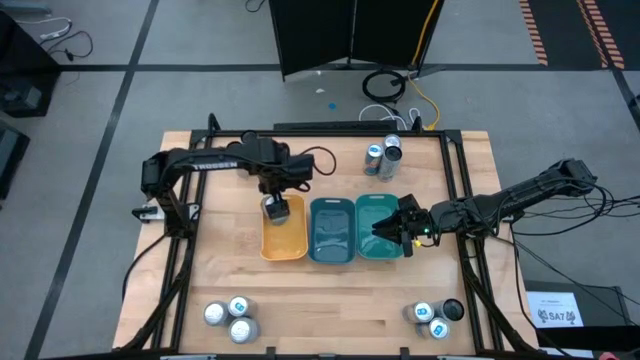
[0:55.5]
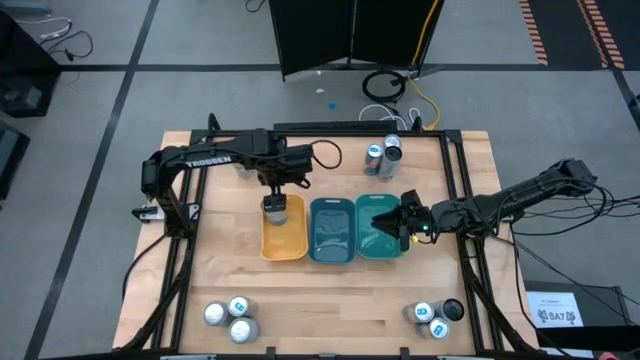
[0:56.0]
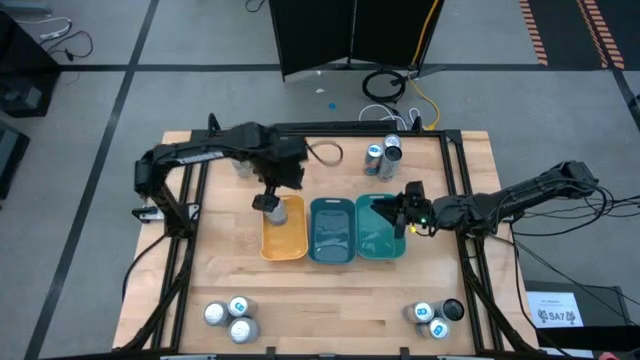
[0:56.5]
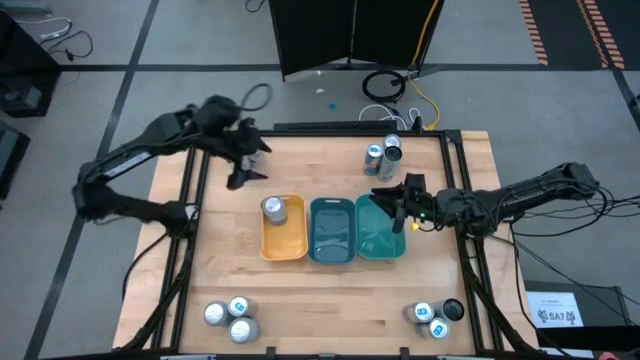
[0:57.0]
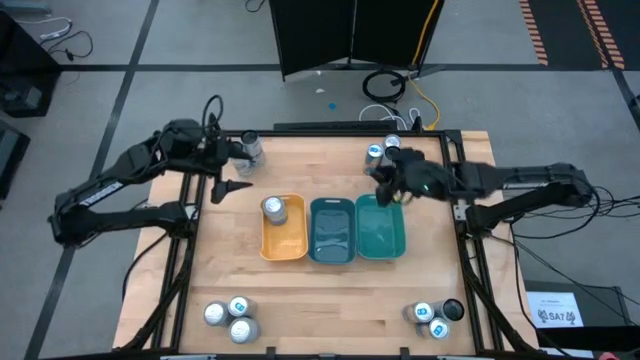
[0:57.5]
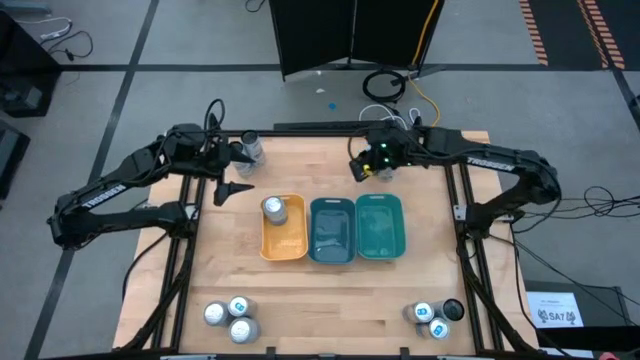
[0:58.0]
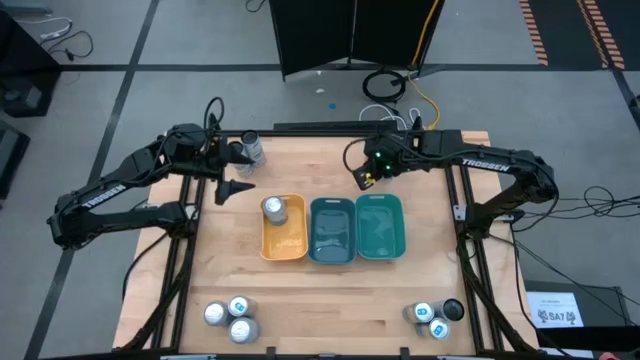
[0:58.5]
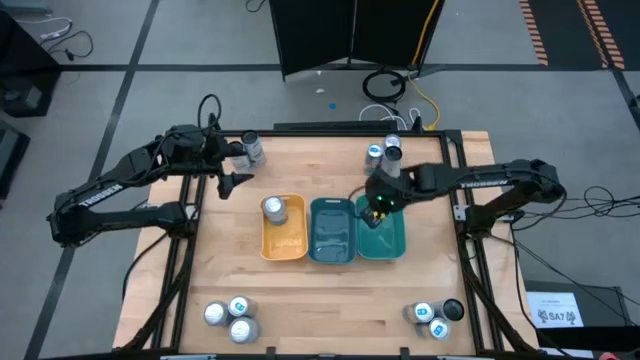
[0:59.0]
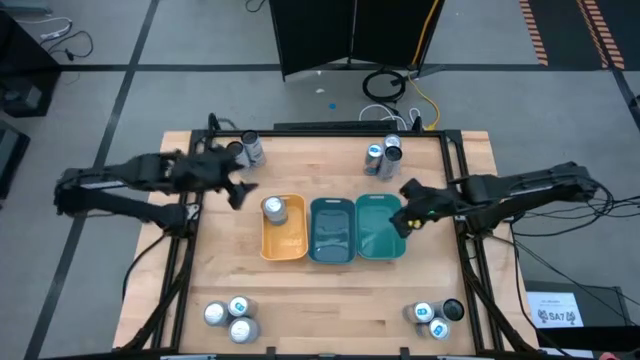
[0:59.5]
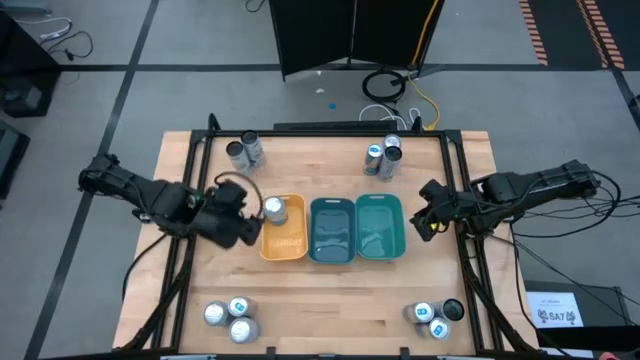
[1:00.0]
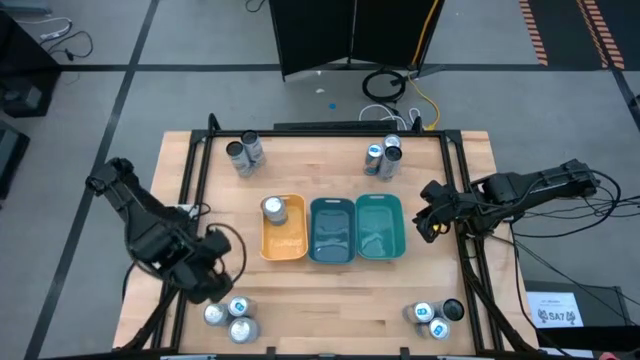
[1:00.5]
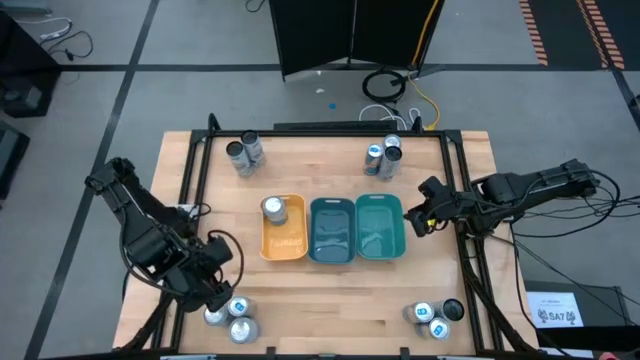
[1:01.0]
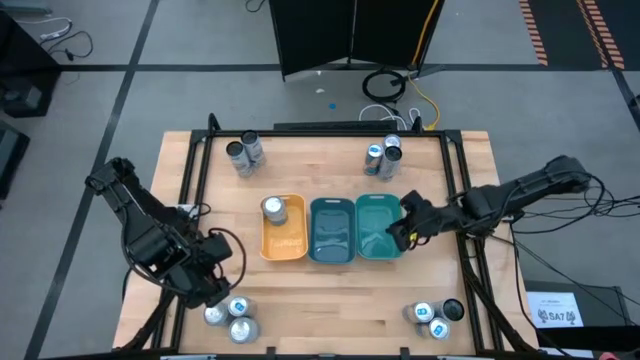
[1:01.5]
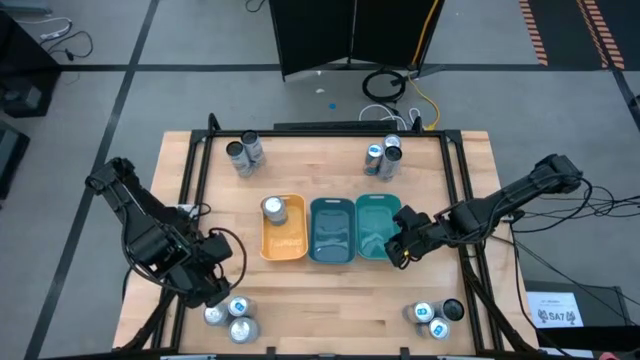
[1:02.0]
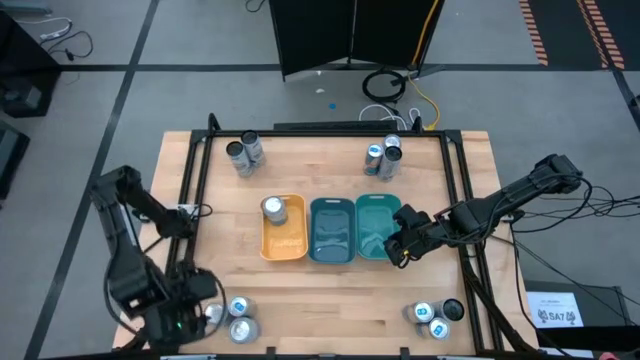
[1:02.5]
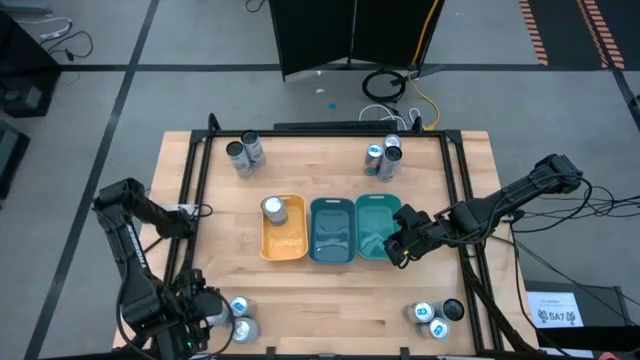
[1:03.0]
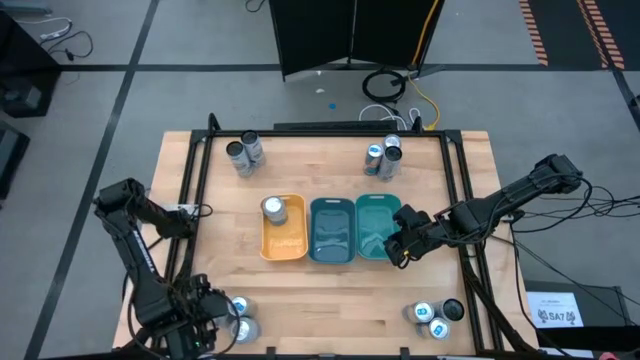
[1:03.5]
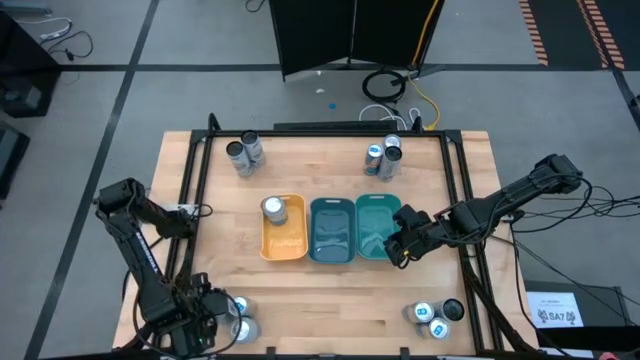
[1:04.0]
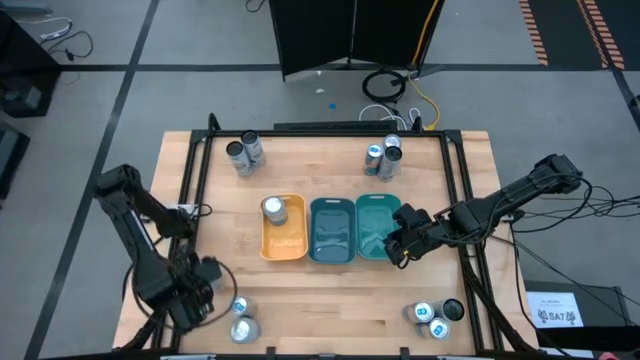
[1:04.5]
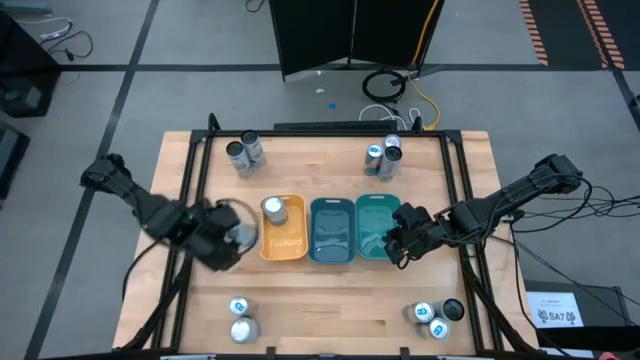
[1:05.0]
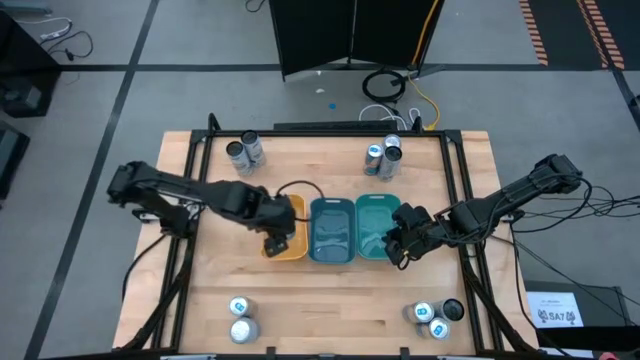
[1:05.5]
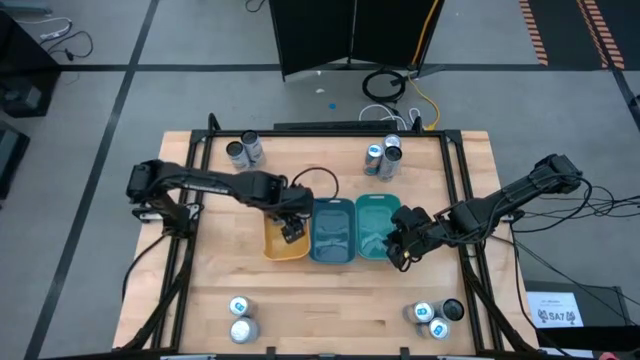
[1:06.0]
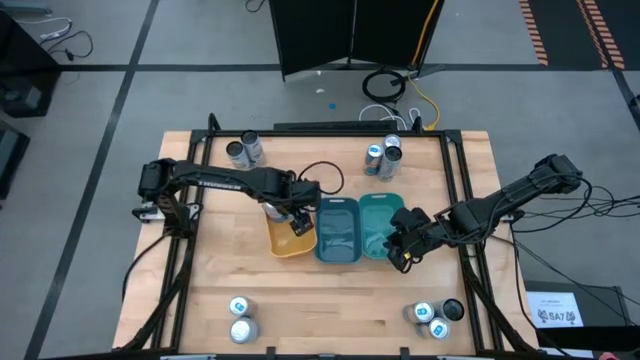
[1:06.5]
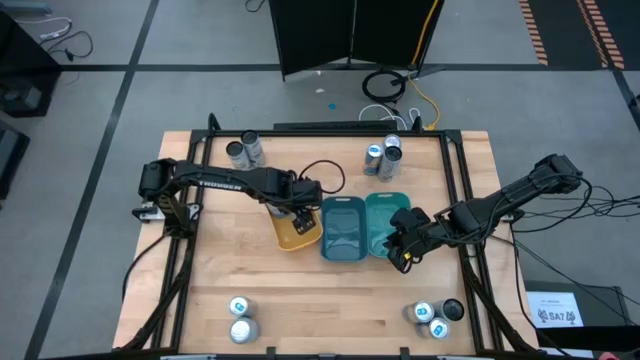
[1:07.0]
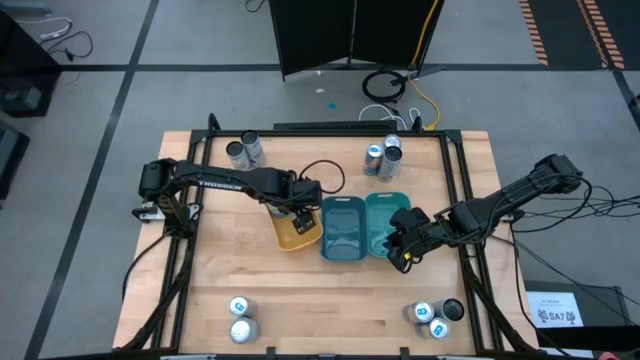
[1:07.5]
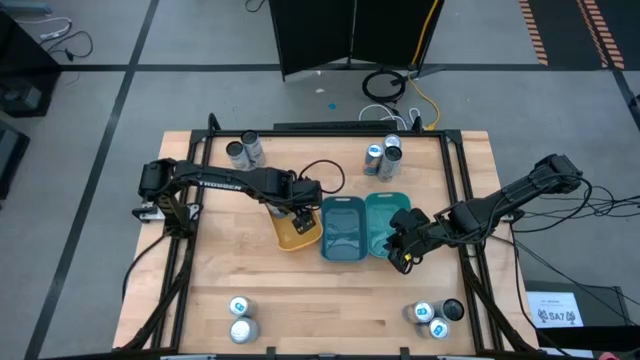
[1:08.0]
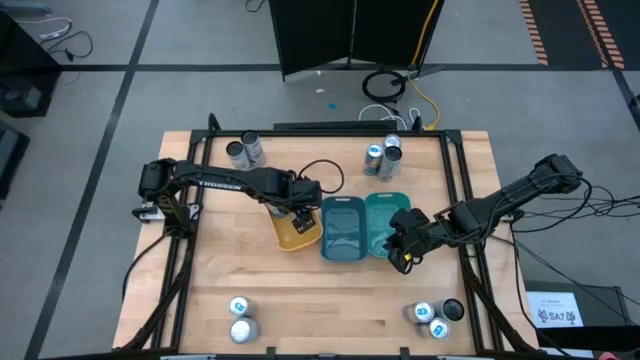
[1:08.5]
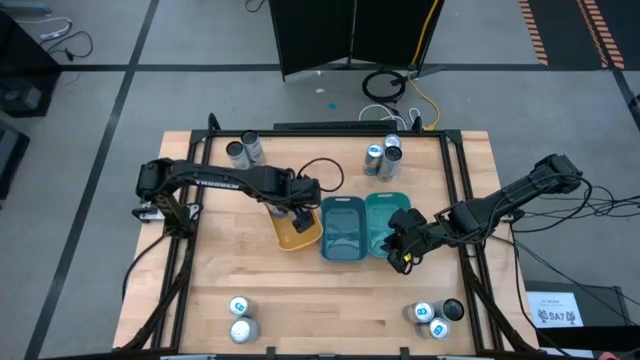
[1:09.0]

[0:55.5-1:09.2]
Task: Sort soda cans
Put the blue-white soda can into the yellow bin

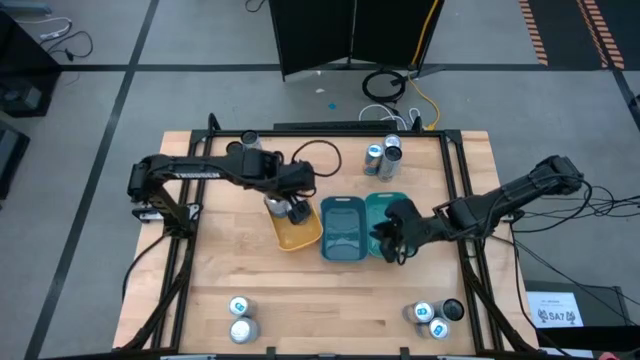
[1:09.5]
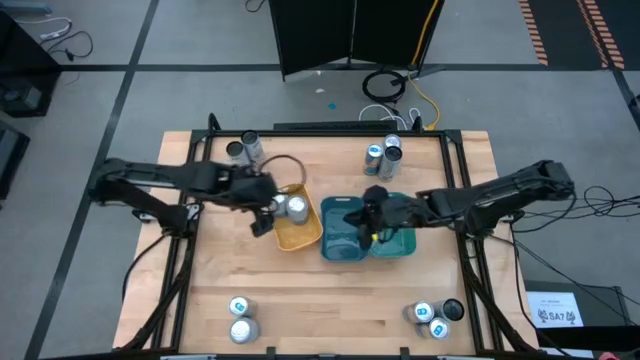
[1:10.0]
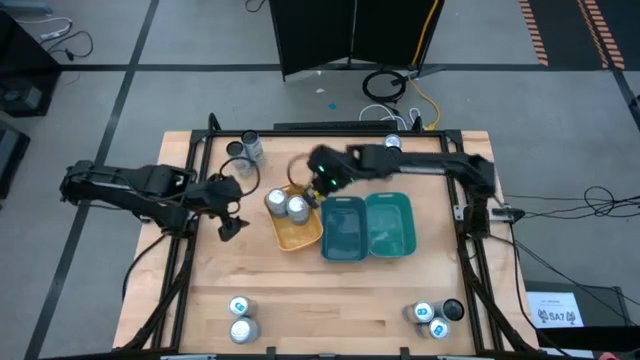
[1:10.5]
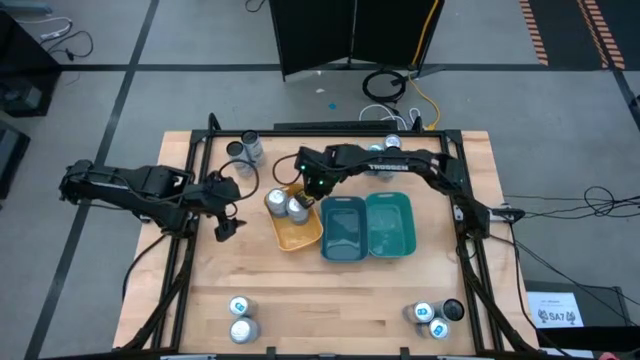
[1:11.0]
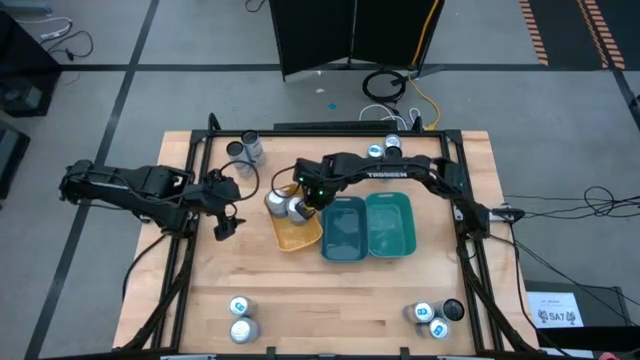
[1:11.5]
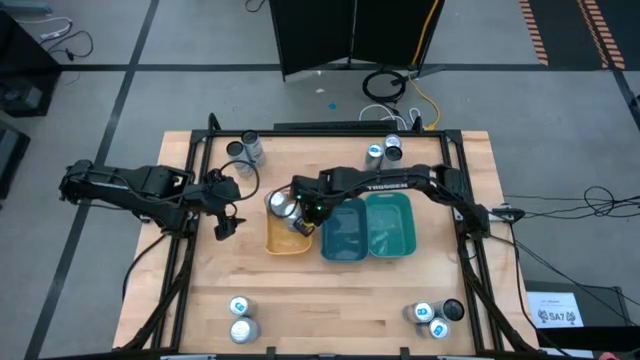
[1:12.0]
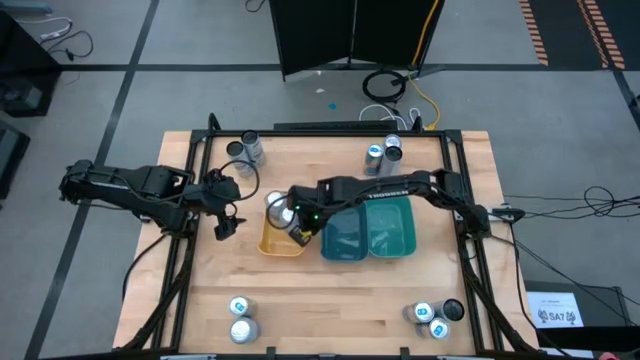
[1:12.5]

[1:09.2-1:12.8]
Adjust the yellow bin

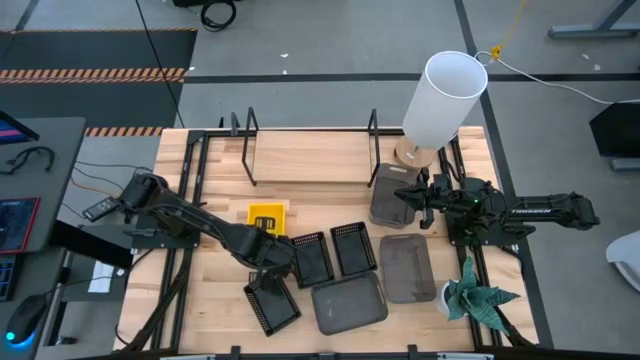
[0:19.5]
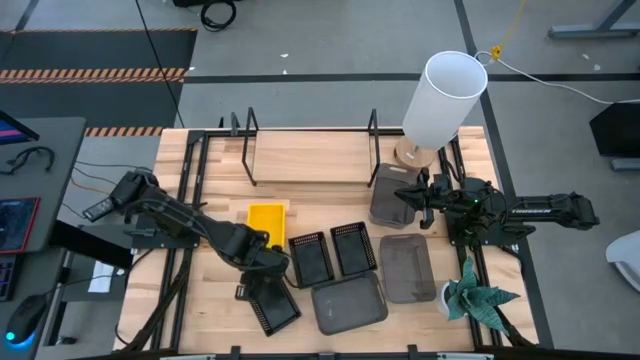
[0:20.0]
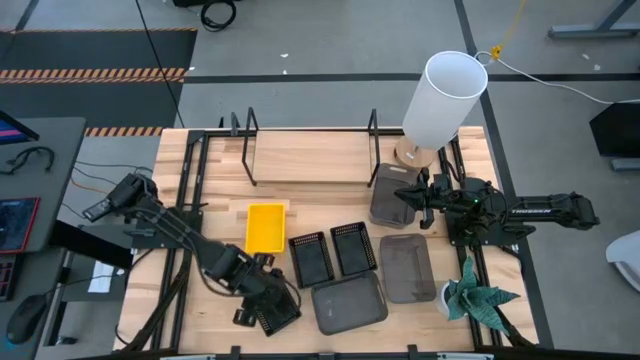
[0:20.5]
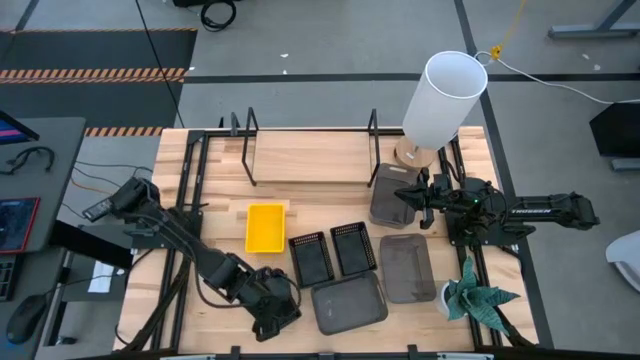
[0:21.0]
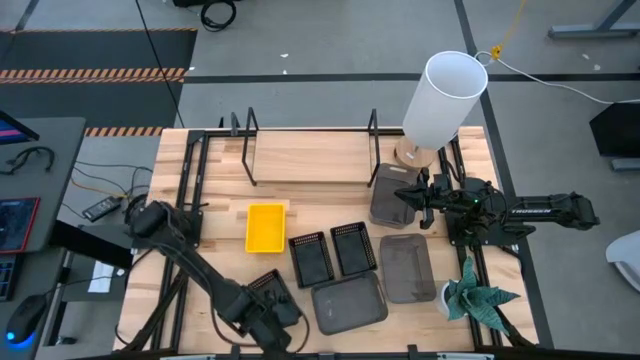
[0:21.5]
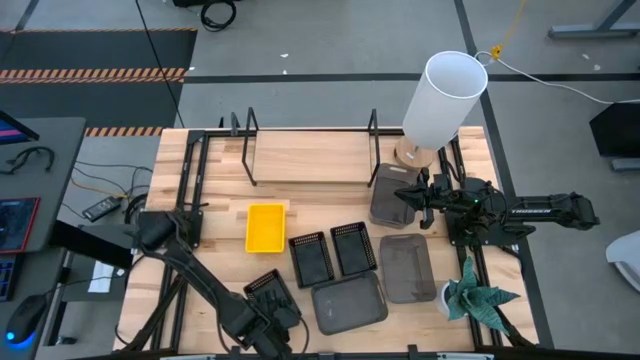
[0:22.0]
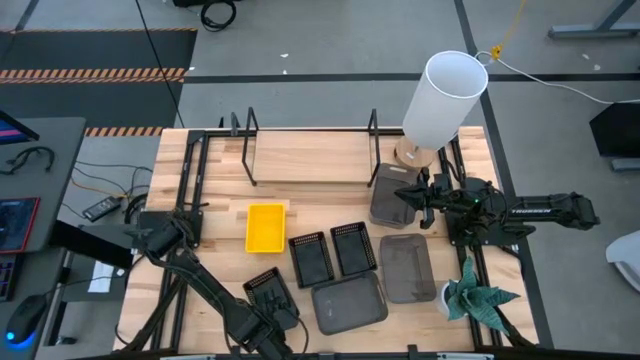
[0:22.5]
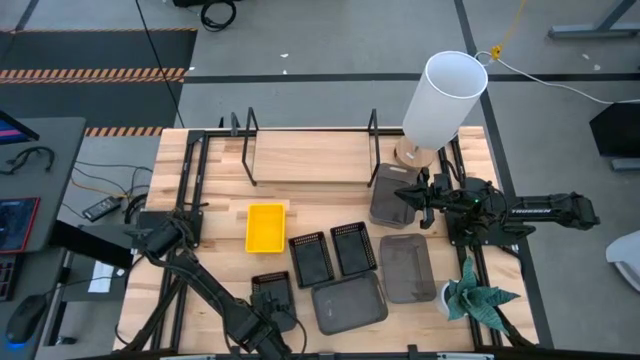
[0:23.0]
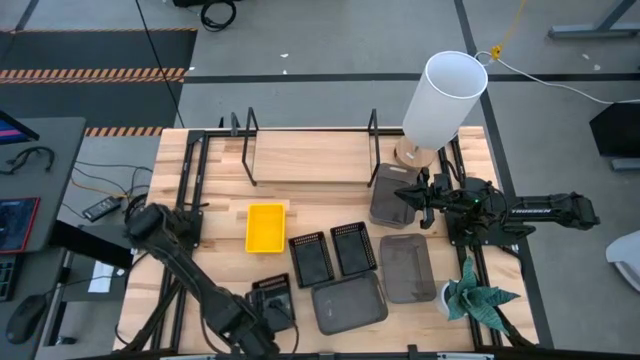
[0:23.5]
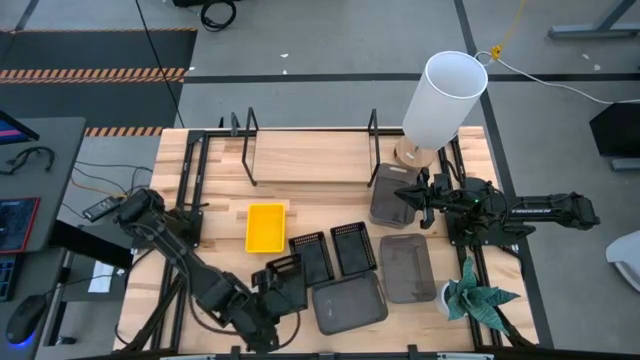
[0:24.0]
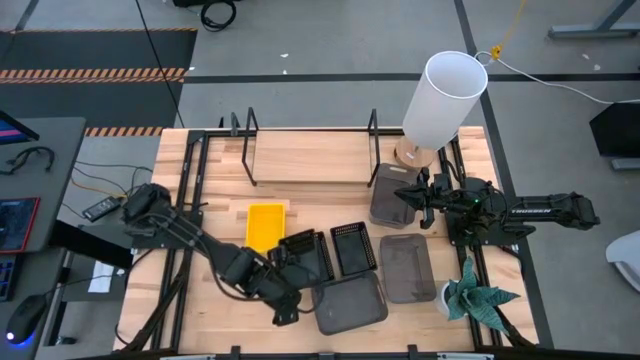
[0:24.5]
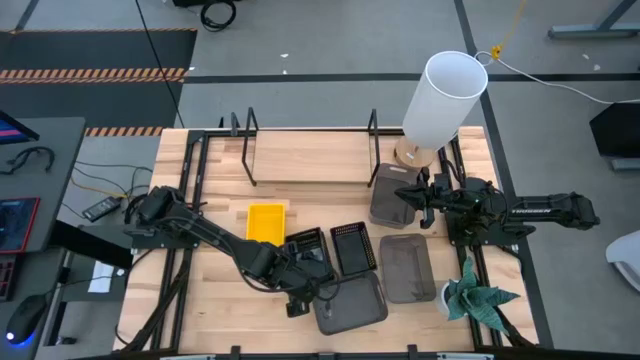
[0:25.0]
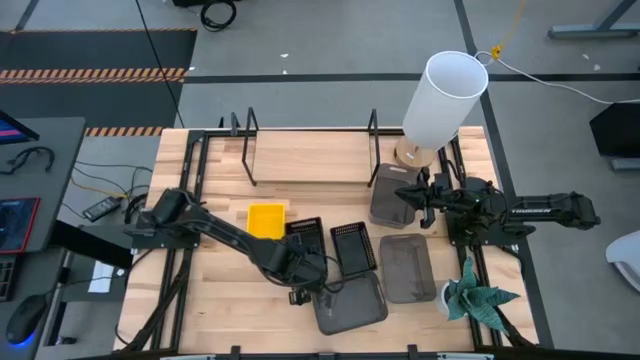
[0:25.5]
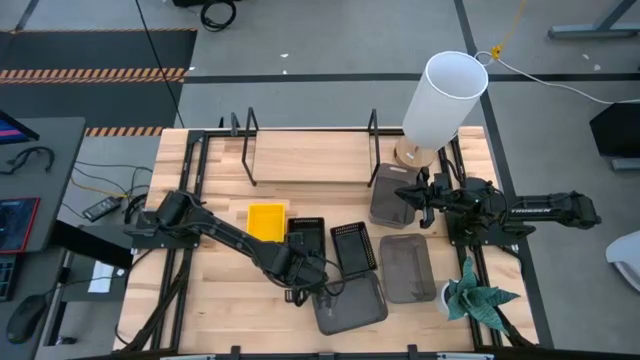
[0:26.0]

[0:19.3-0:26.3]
Task: Stack baskets on shelf by color
Stack the bottom left black bin on the middle black bin
